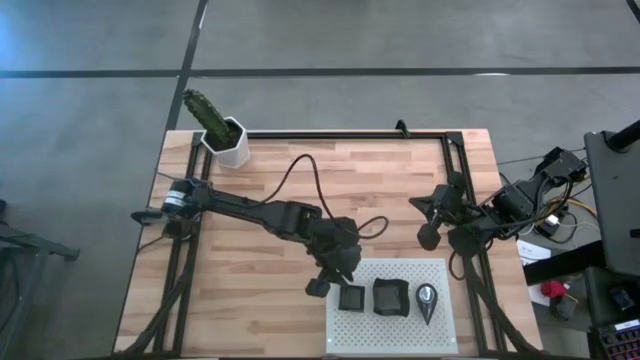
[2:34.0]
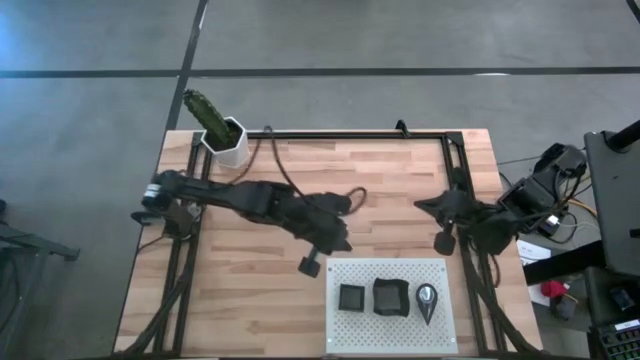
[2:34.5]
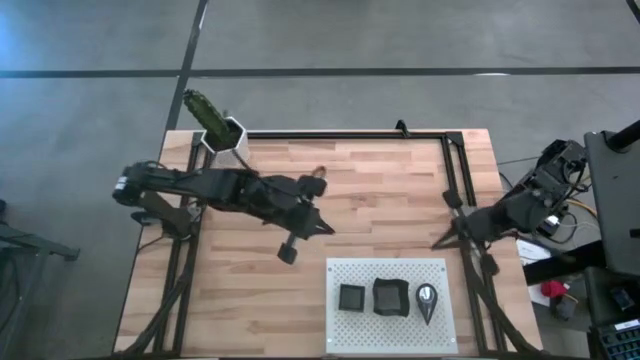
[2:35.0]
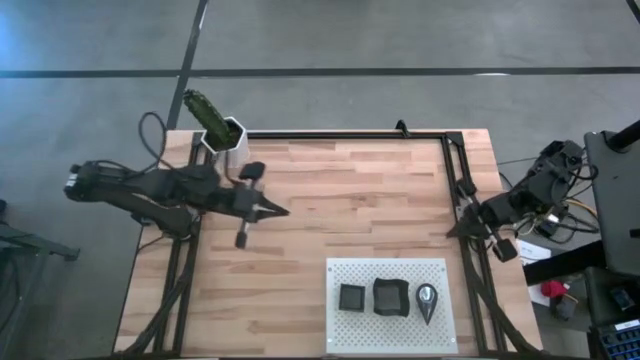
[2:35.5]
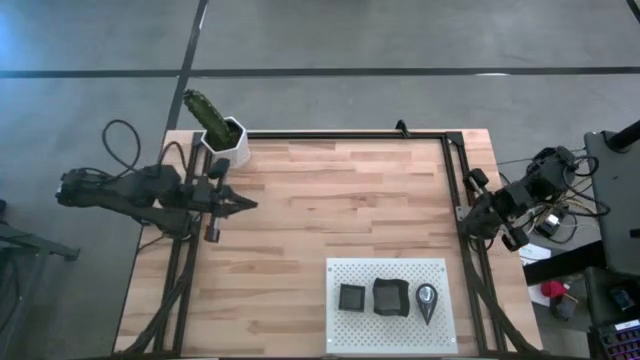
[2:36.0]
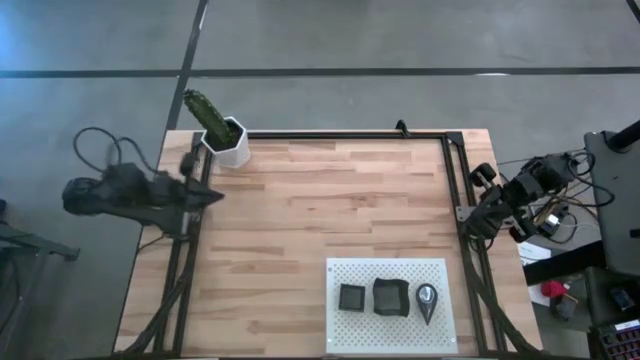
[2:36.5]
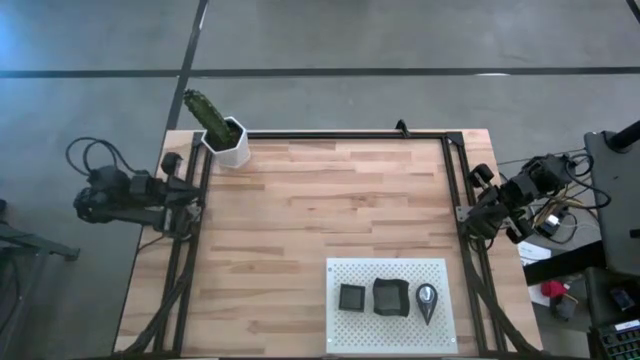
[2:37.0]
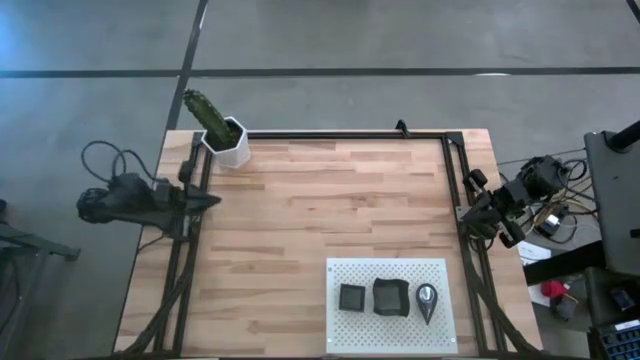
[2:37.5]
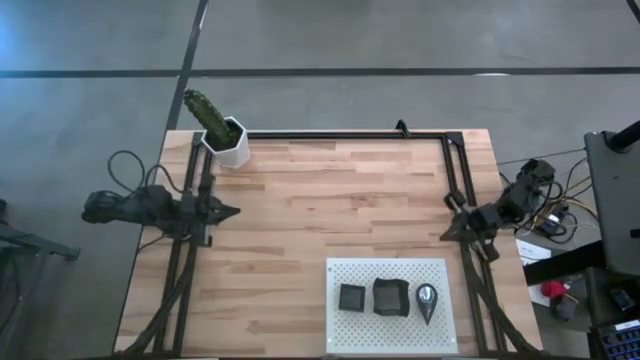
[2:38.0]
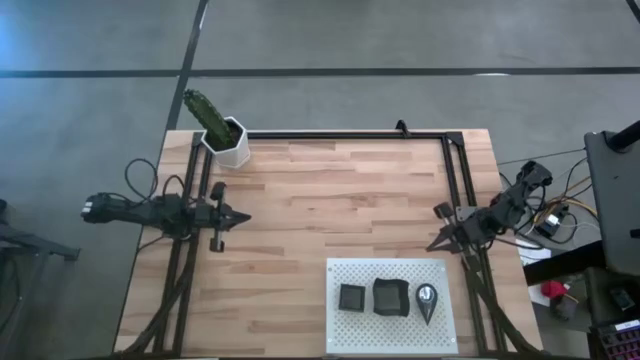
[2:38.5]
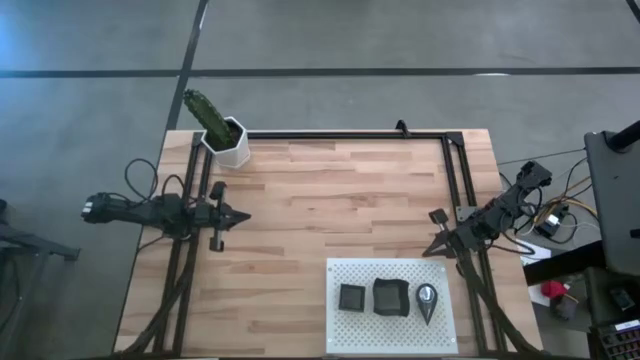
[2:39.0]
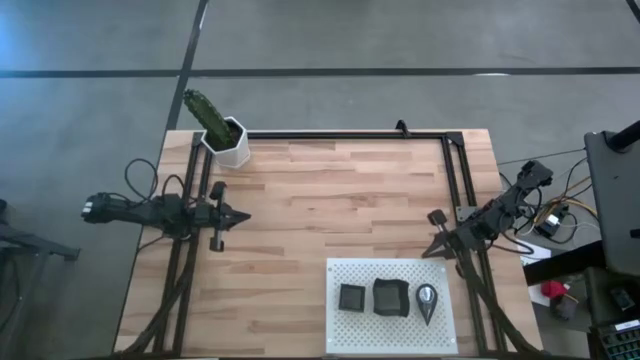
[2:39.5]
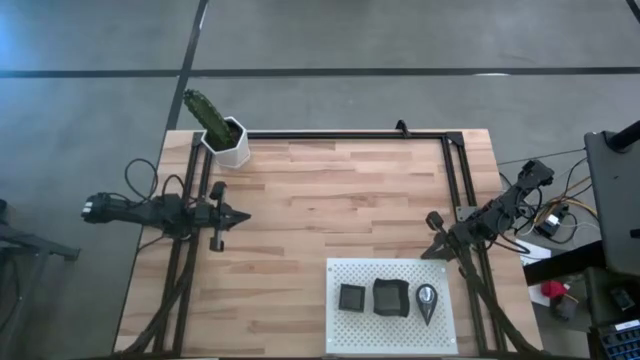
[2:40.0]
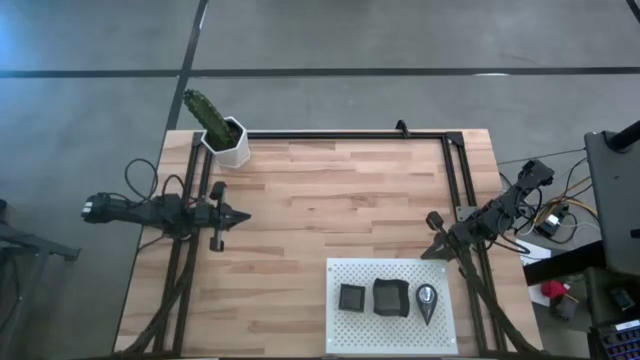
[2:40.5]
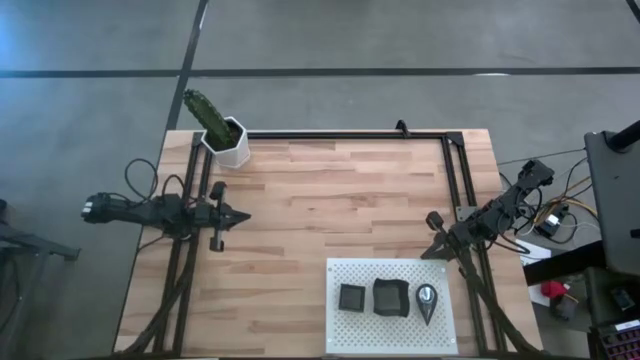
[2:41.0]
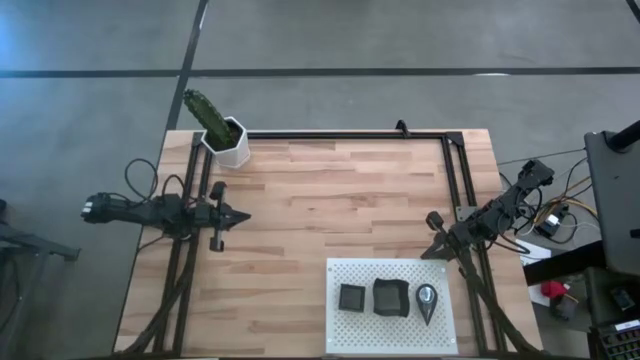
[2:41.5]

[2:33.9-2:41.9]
Task: Pick & Place Mini shaped plates
Return to Home Position

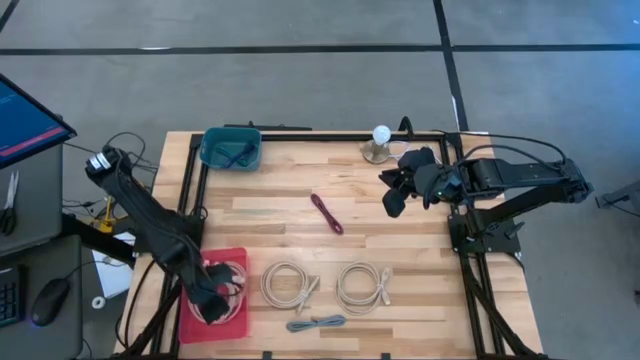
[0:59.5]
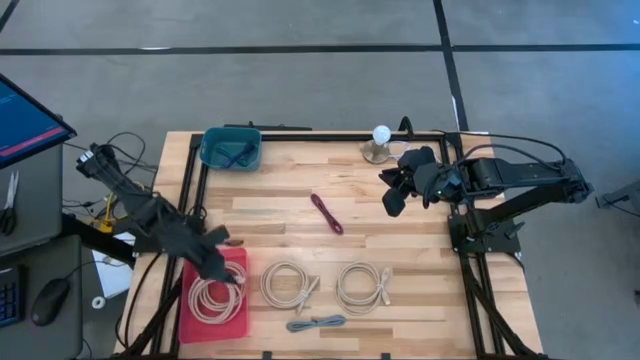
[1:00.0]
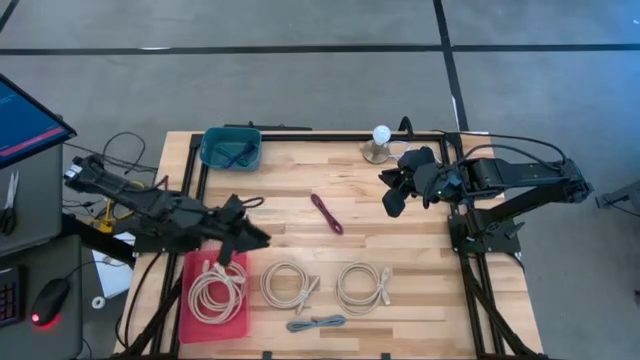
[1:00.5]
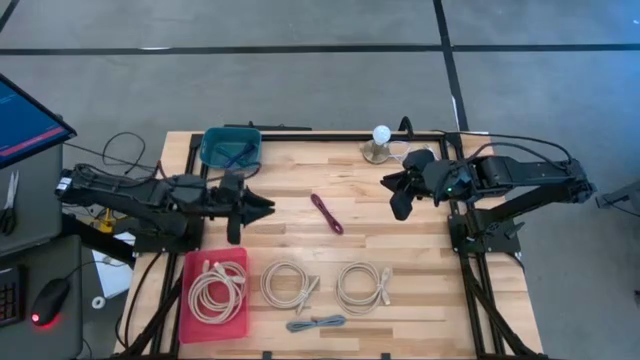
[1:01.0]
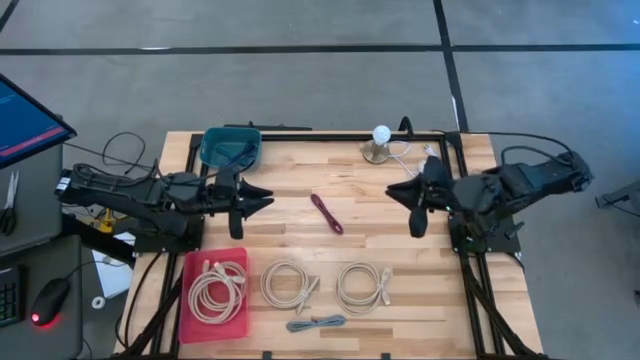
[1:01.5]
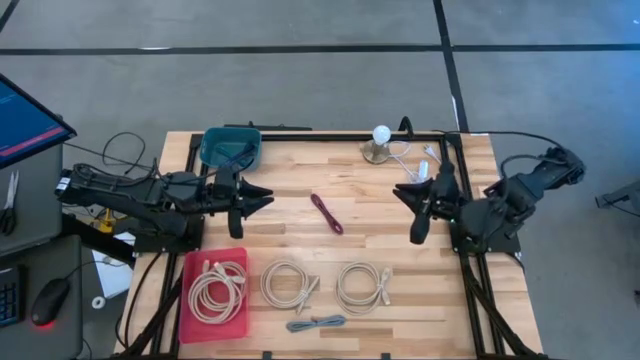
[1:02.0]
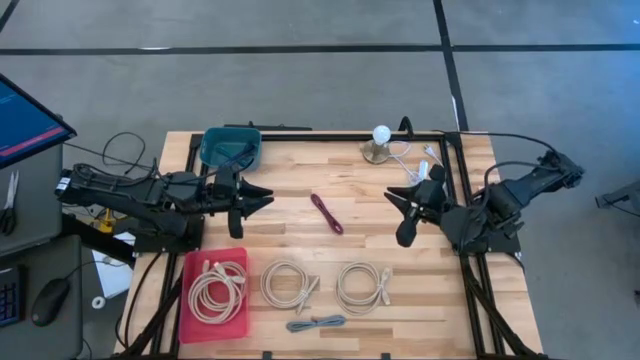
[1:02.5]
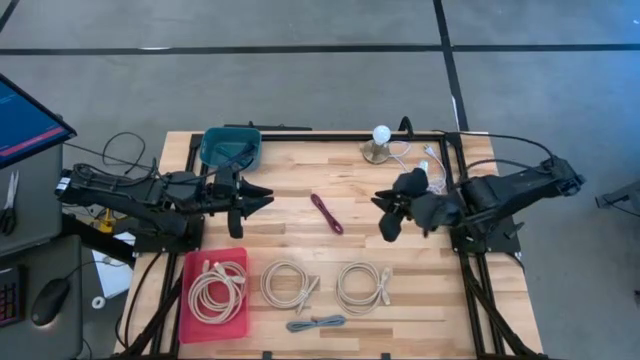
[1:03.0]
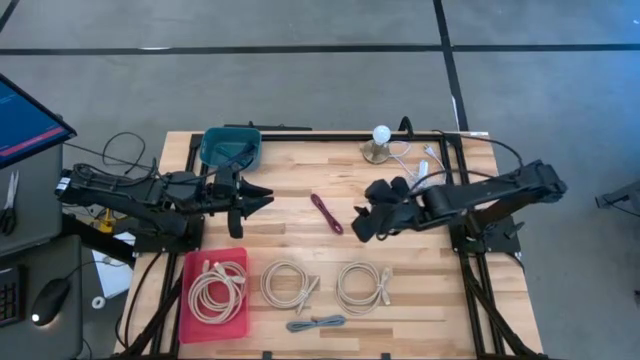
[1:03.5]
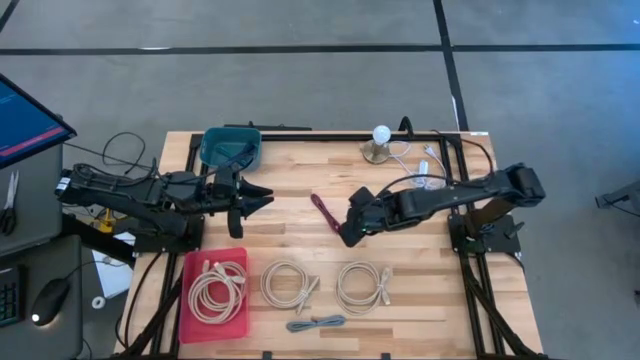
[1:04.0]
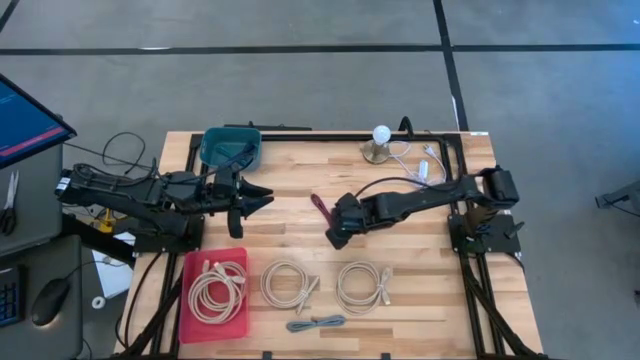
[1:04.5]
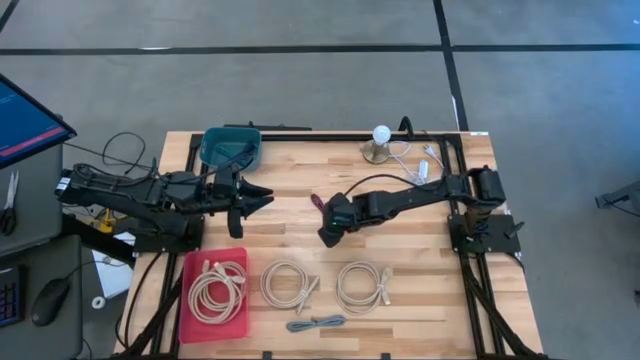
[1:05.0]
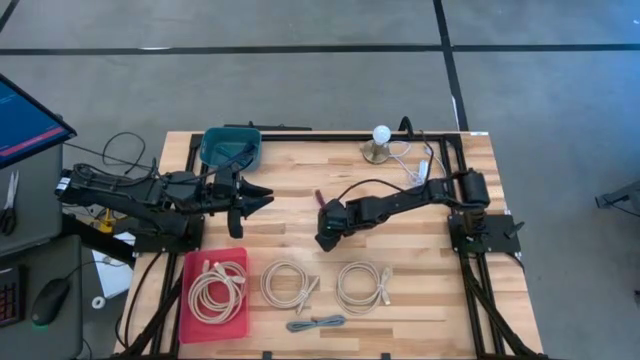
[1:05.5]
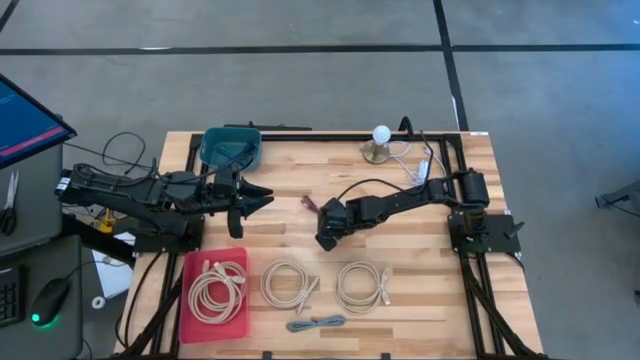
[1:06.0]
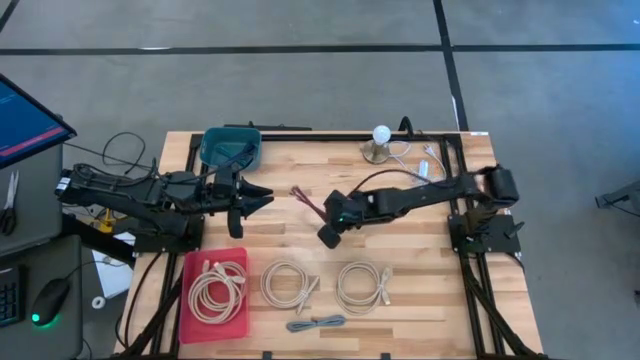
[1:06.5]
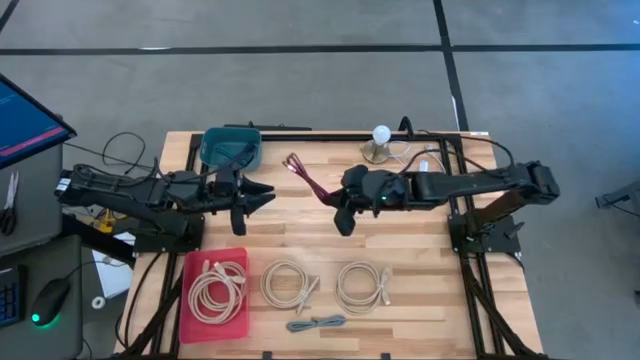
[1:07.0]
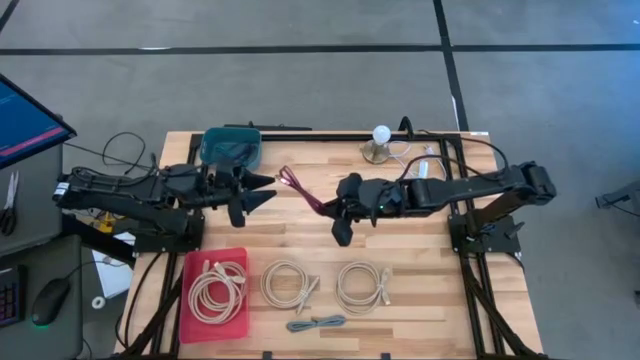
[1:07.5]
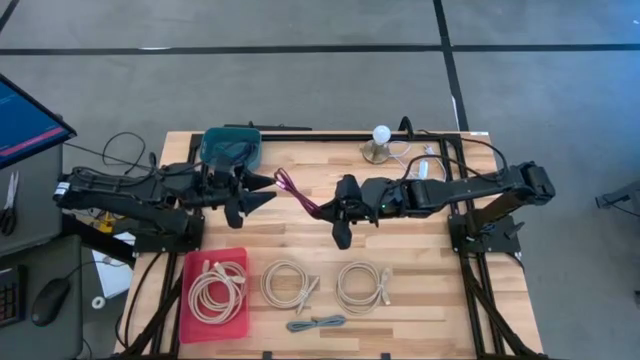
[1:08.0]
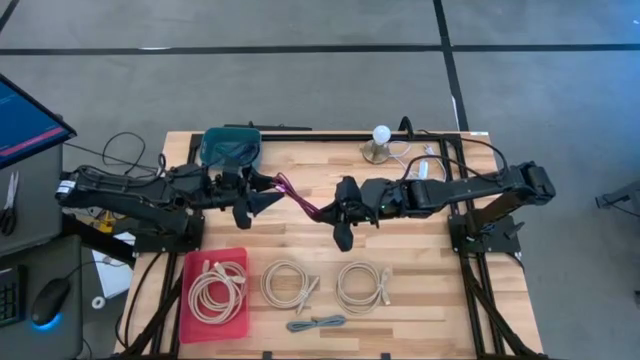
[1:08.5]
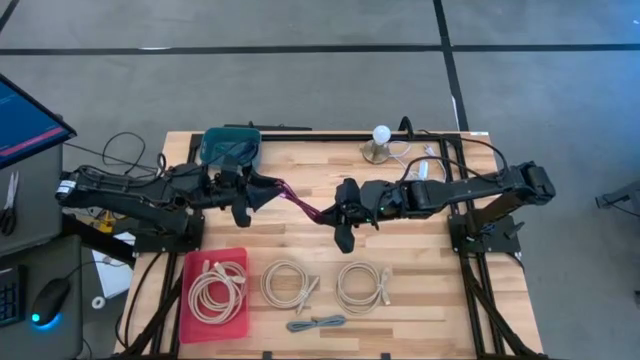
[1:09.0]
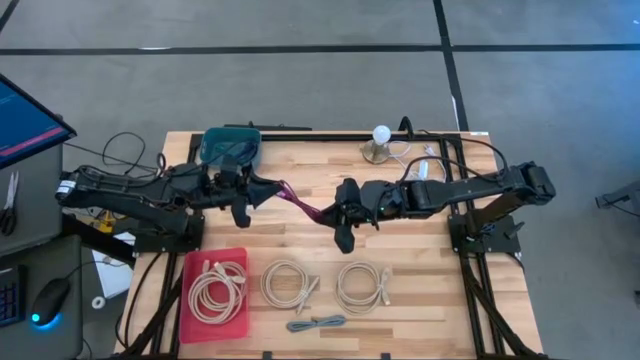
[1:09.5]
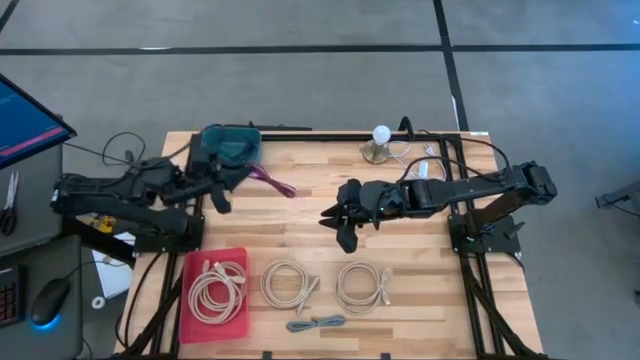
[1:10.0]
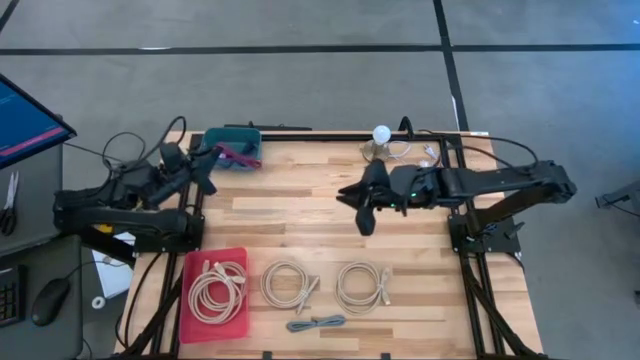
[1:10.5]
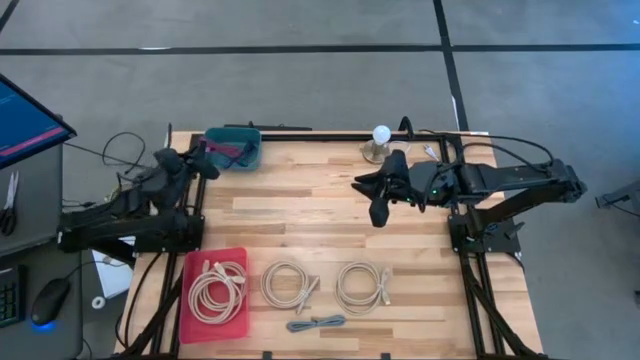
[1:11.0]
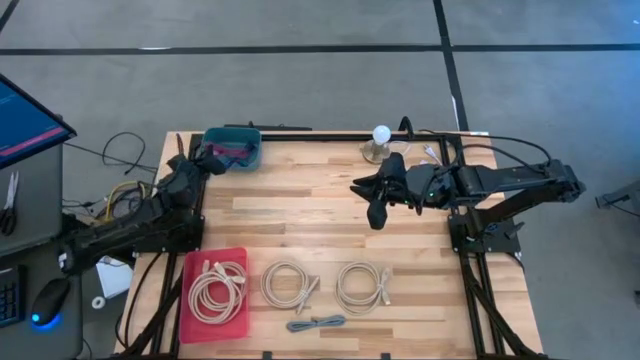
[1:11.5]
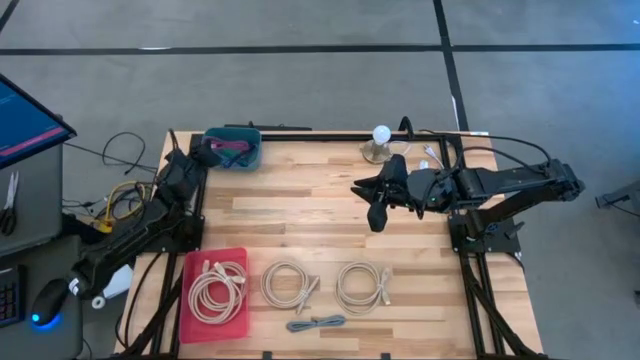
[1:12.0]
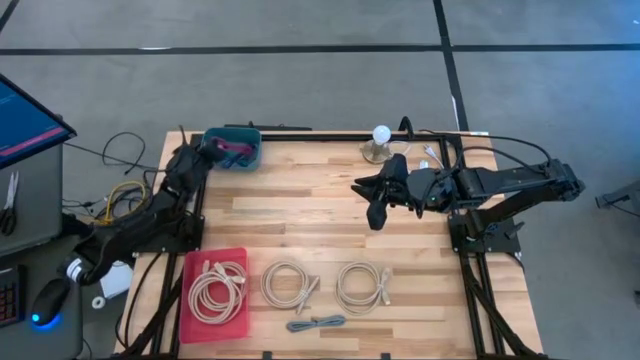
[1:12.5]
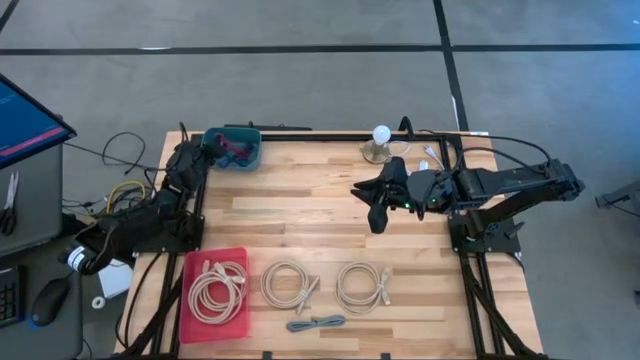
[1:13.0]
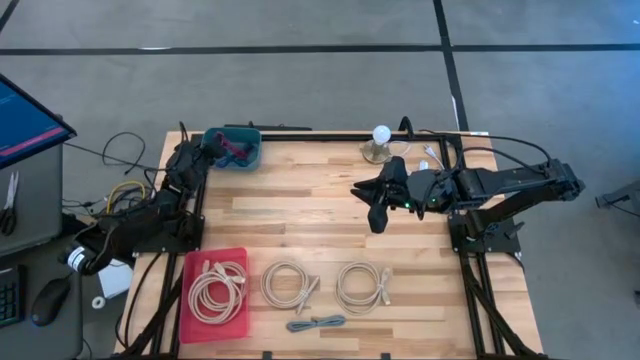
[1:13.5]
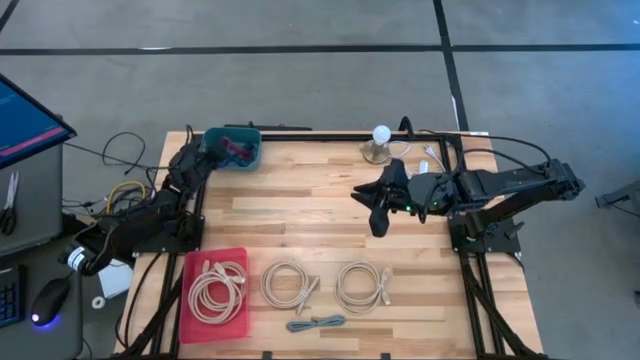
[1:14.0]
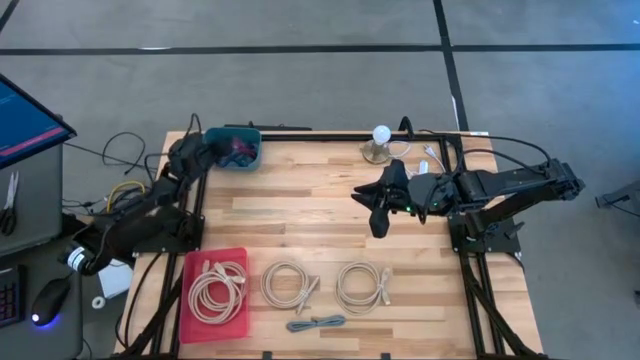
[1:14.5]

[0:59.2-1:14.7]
Task: Pick & Place USB Port
Put the pink USB cable into the blue bin
